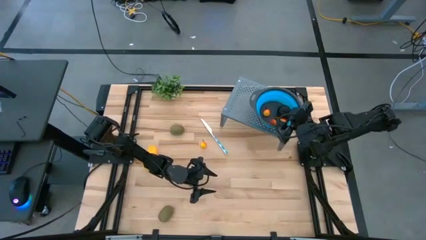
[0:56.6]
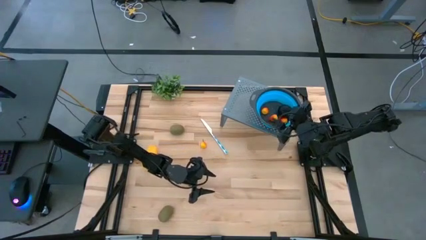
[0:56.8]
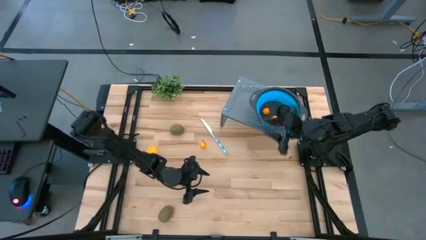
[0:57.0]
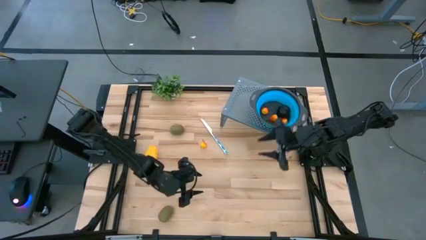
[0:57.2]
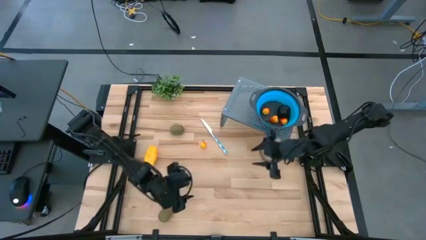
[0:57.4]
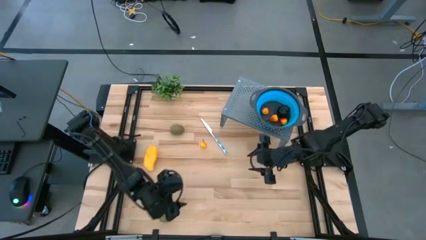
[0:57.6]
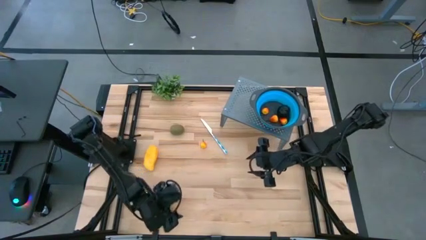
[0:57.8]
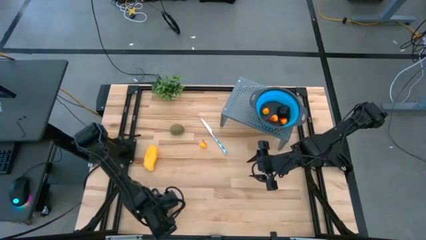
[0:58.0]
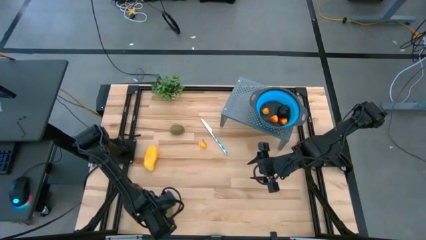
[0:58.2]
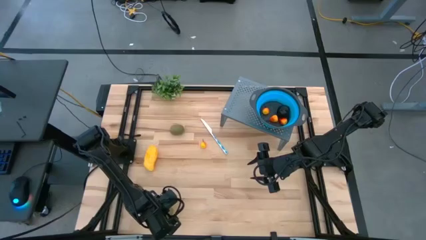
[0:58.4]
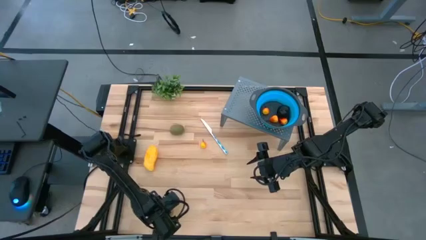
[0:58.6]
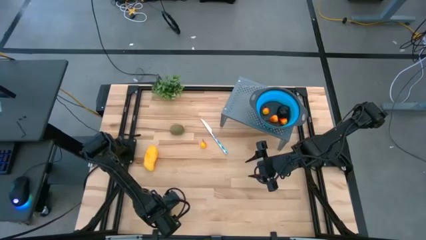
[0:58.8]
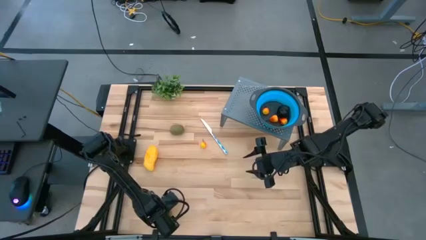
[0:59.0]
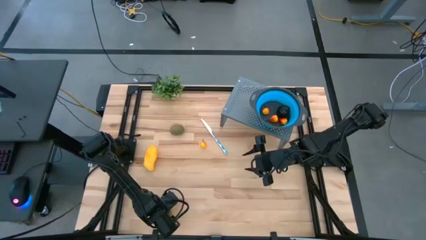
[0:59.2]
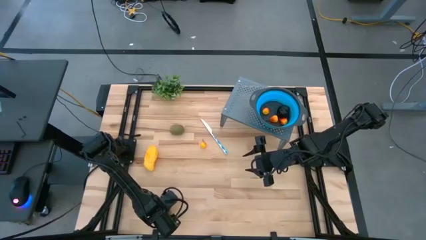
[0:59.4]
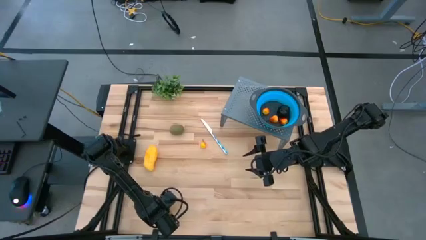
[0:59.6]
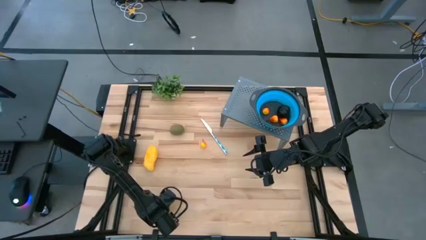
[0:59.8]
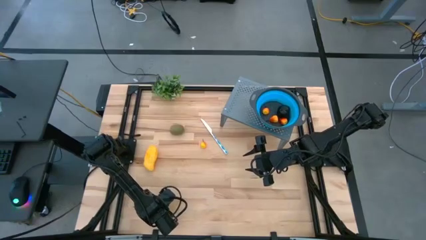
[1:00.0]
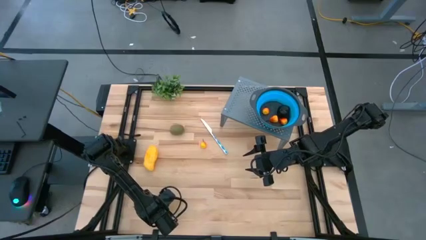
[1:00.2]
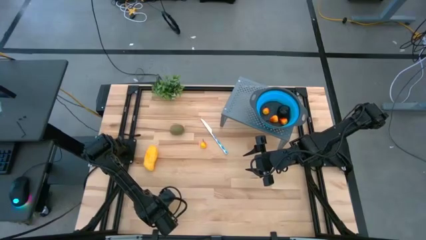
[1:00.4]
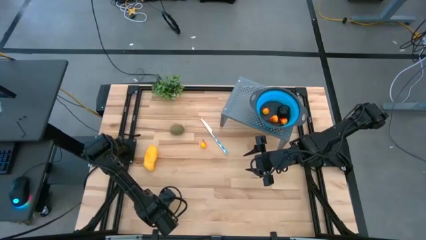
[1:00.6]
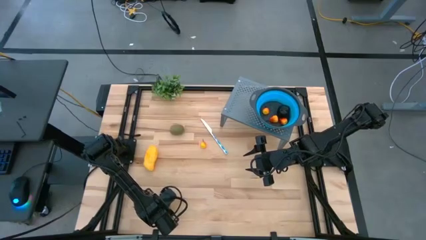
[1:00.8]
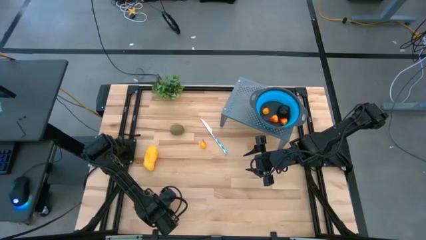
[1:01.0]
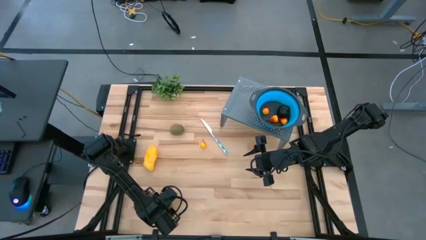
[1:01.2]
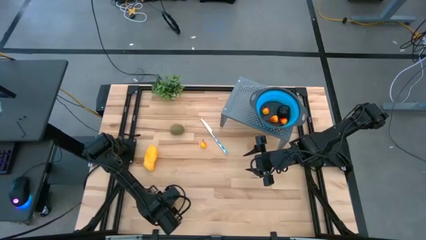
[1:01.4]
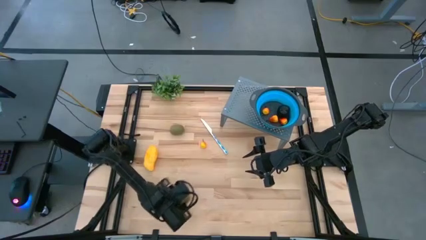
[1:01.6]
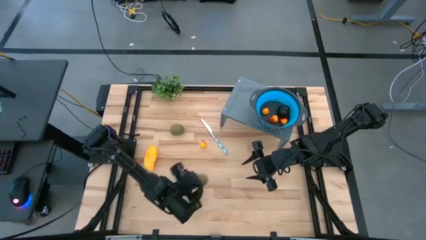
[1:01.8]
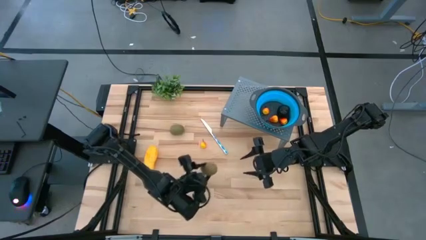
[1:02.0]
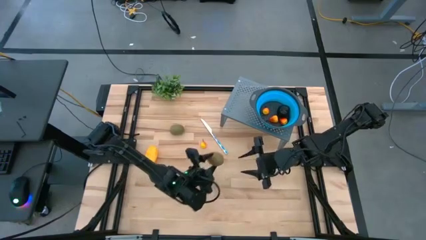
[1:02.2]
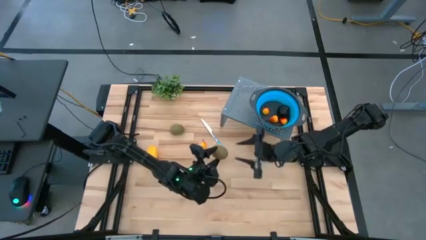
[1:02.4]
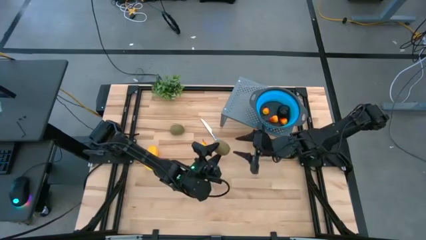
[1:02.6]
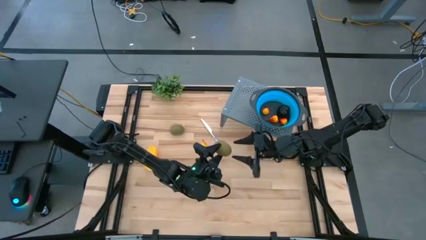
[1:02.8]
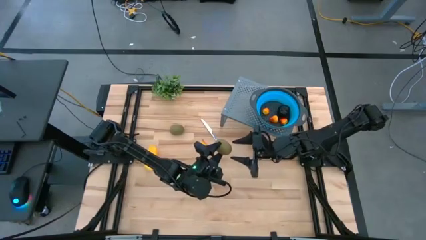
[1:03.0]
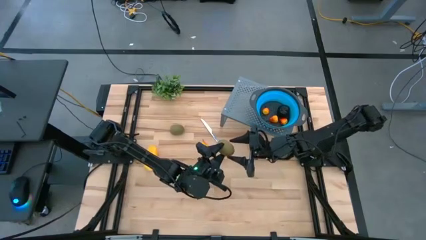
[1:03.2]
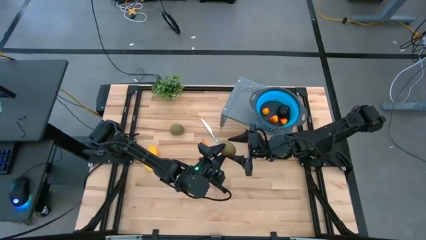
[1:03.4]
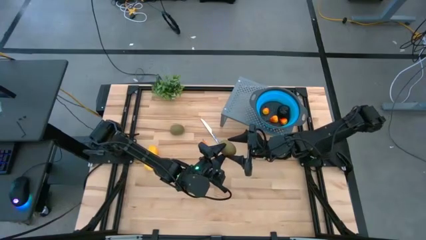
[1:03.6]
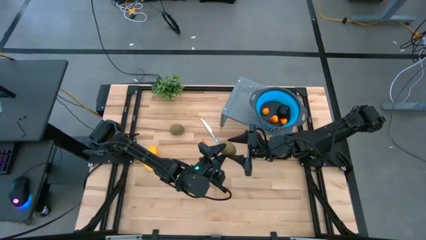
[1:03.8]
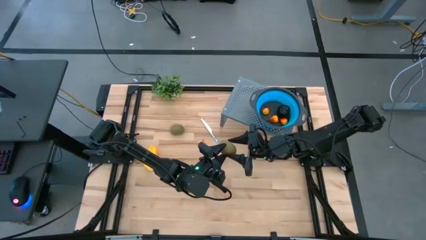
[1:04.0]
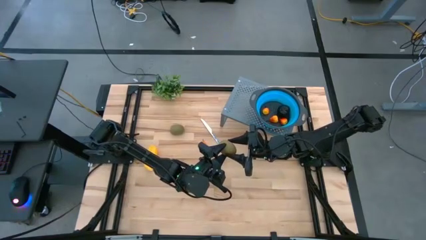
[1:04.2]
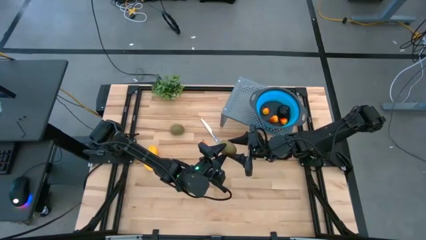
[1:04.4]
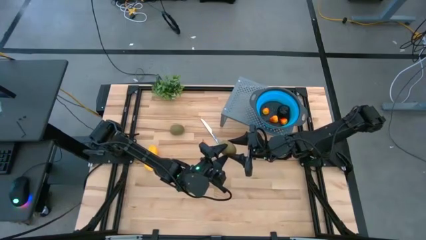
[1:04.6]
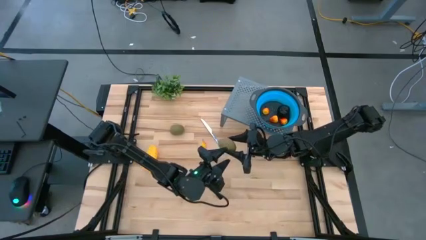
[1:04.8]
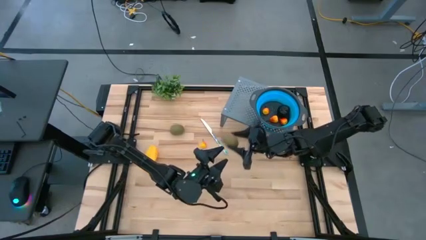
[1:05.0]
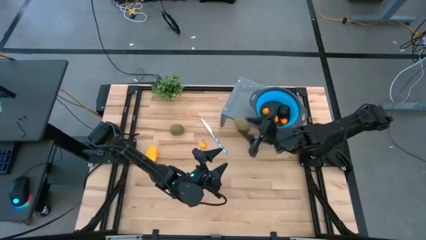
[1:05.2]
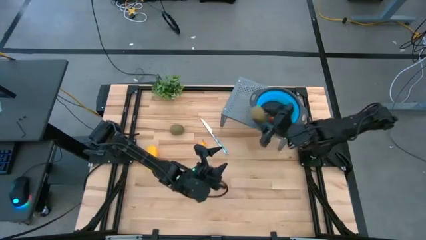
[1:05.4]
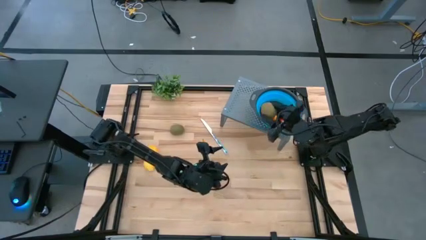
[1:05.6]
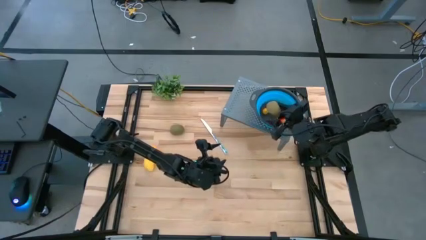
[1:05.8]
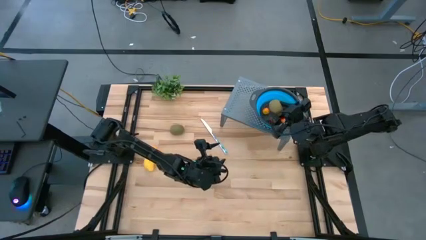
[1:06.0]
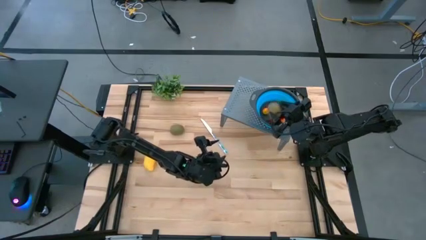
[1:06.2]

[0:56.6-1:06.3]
Task: Pick & Place Fruit
Put the kiwi into the blue strainer bowl on the shelf

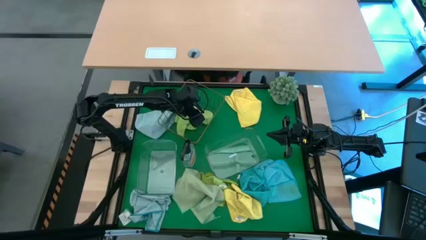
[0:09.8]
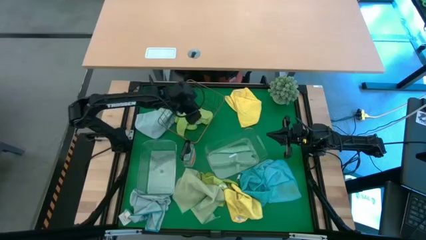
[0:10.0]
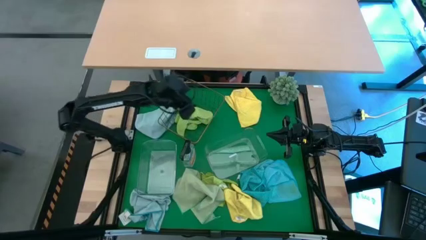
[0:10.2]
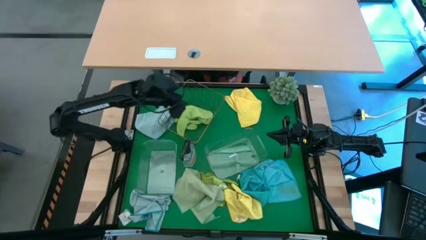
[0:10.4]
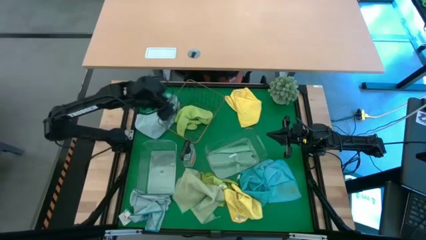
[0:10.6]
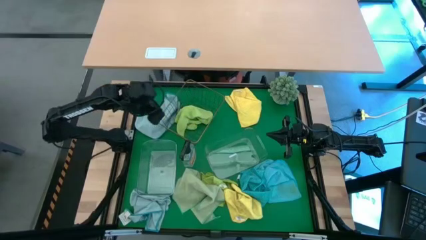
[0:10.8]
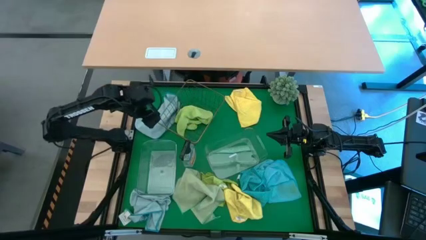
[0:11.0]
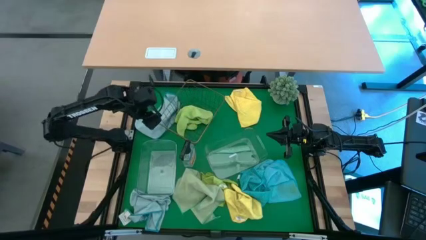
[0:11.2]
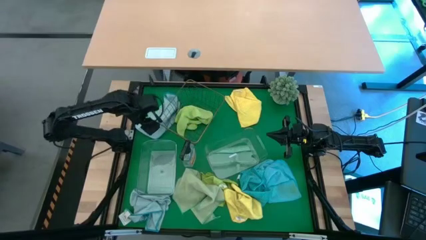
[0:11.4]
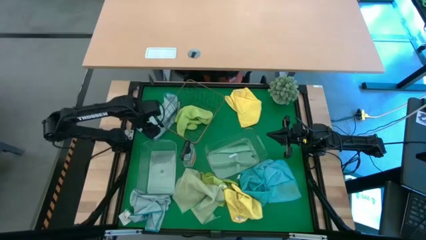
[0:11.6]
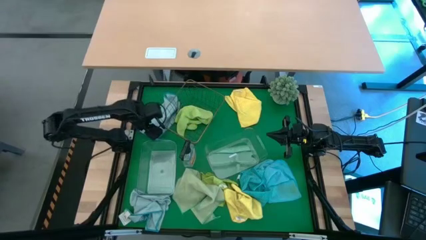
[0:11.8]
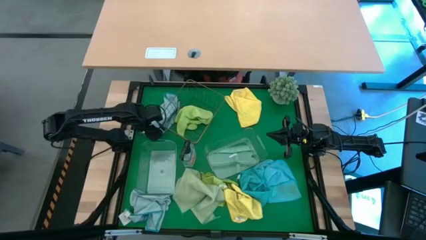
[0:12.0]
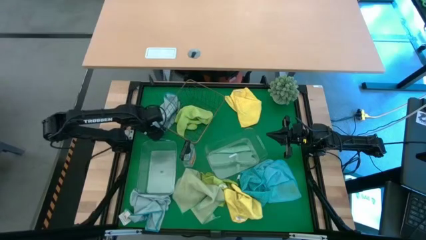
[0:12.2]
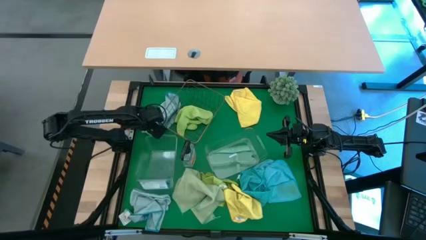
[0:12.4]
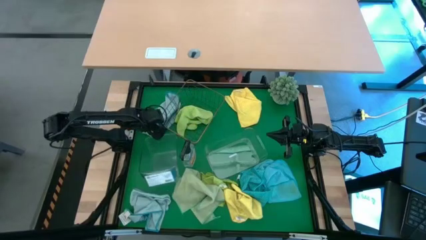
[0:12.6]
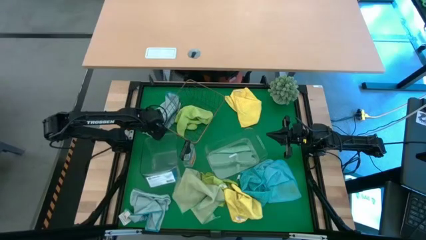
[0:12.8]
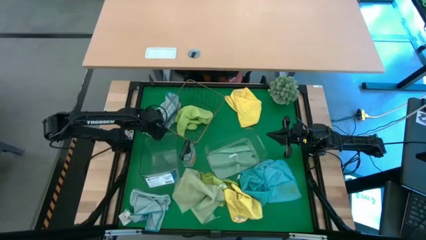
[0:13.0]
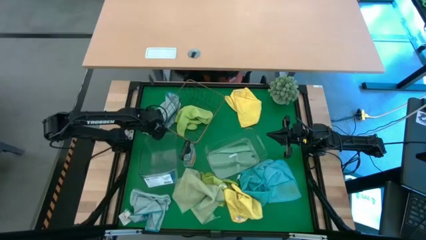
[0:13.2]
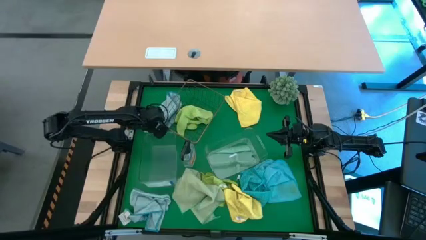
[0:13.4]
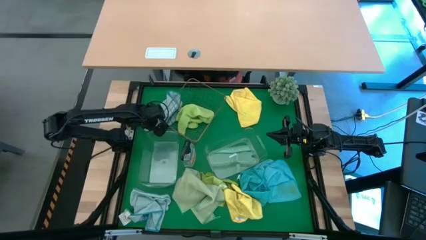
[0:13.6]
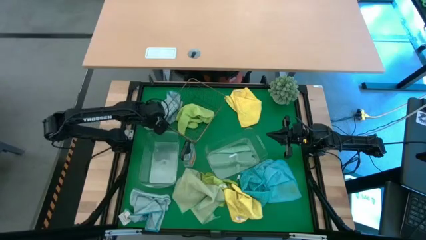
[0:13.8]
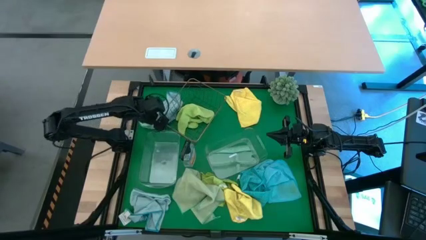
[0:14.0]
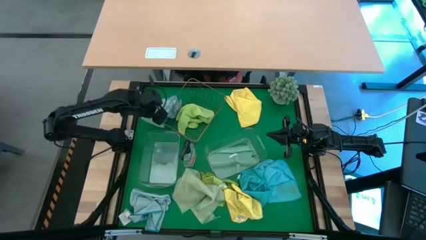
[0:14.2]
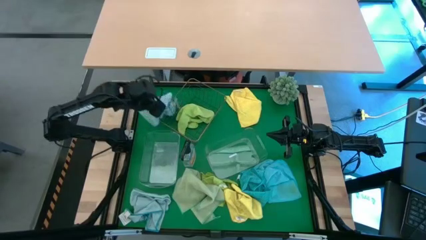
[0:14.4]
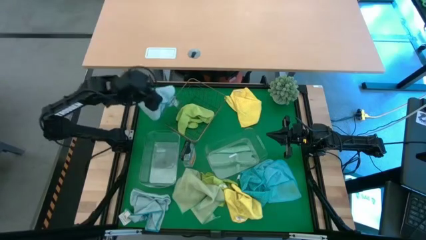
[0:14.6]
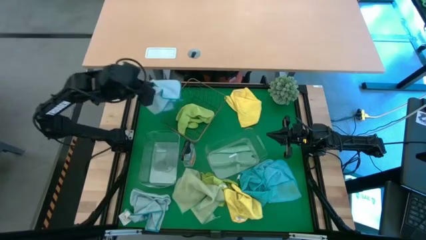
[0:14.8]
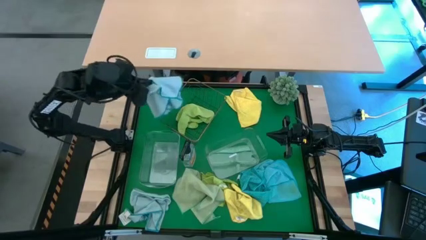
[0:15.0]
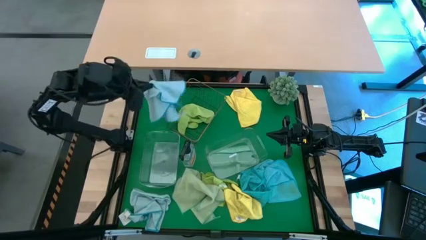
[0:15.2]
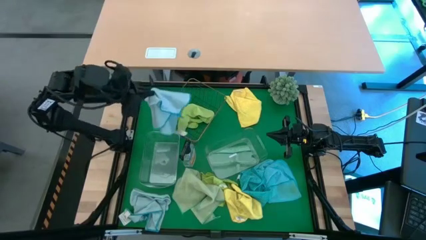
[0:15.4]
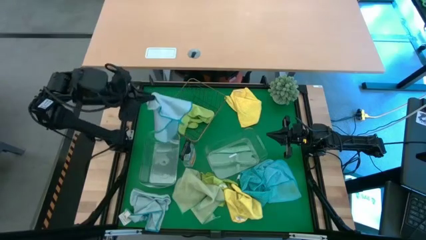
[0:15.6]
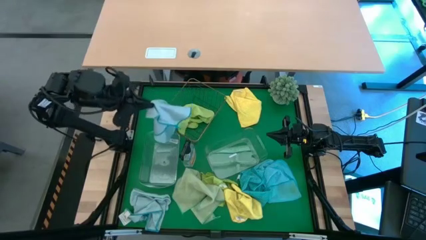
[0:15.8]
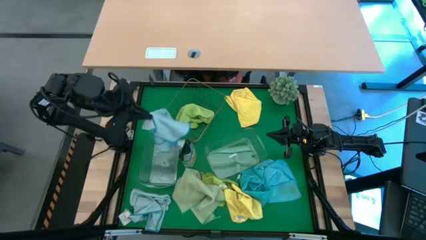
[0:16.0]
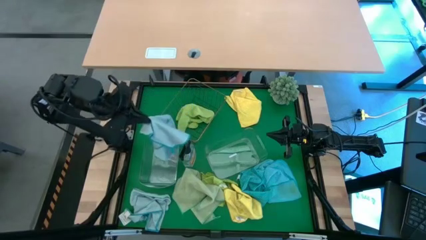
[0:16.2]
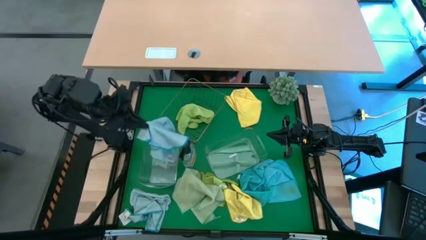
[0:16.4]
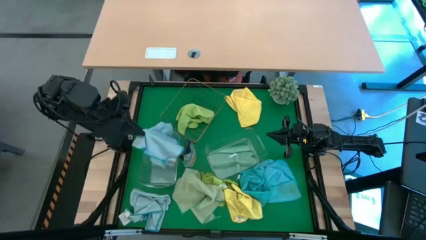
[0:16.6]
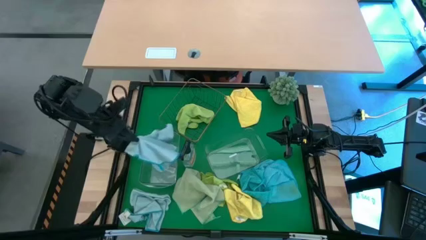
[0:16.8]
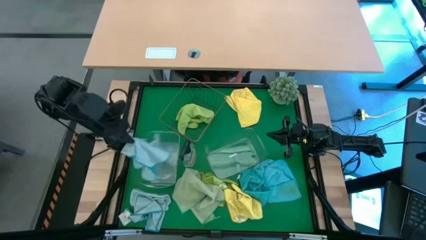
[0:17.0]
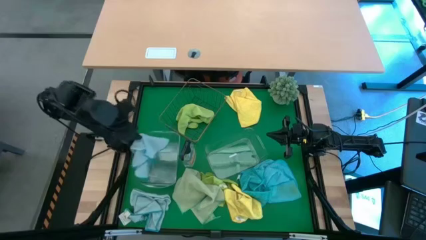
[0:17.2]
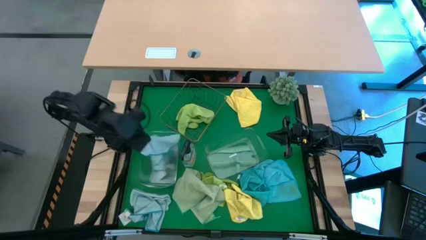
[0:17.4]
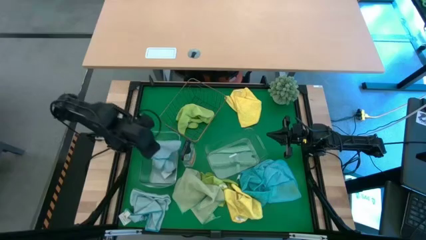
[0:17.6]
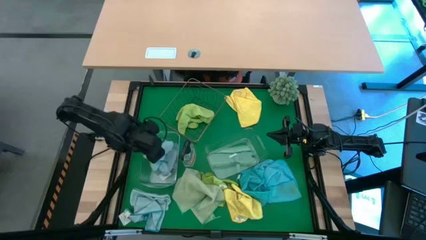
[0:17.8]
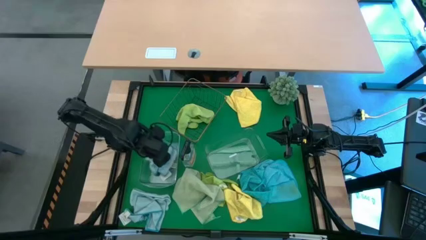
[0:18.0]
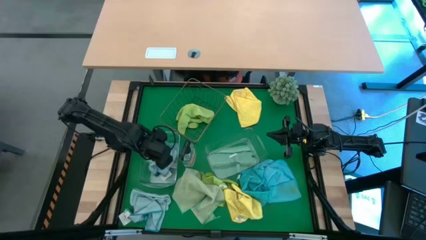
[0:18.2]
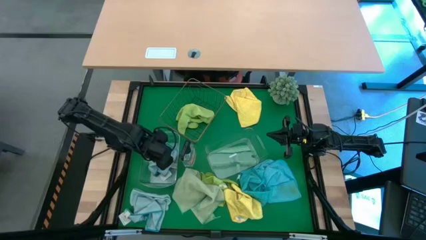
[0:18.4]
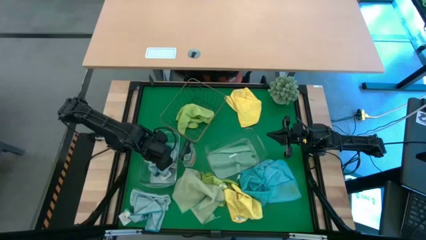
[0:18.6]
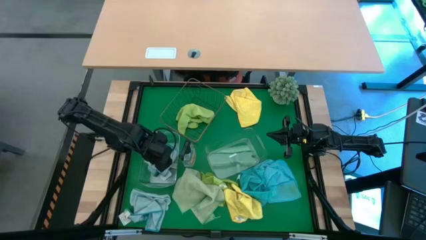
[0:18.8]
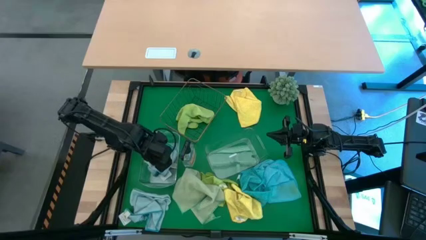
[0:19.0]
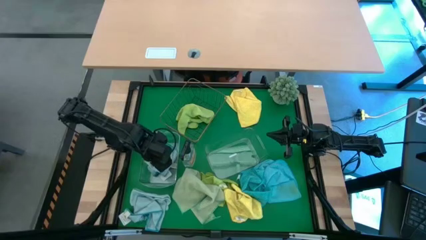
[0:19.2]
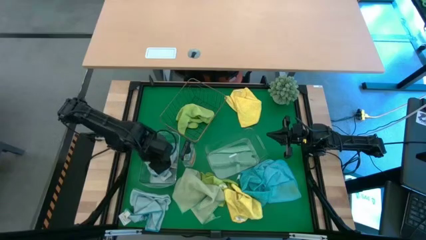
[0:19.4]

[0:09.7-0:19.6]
Task: Sort microfiber towel by color & place in baskets
Put the top light blue microfiber towel into the left transparent bin
